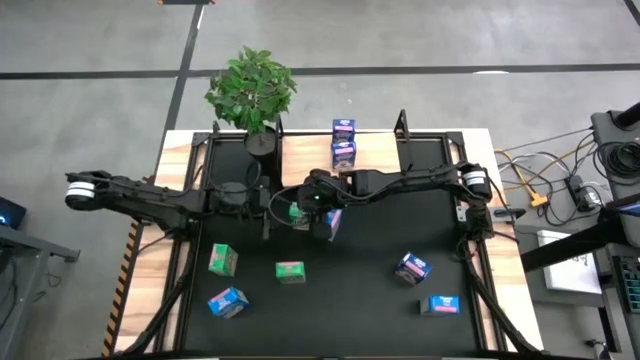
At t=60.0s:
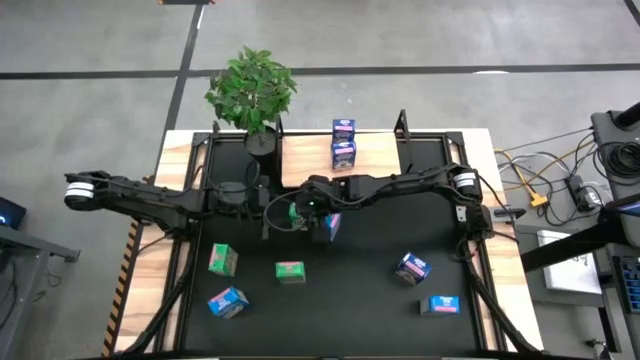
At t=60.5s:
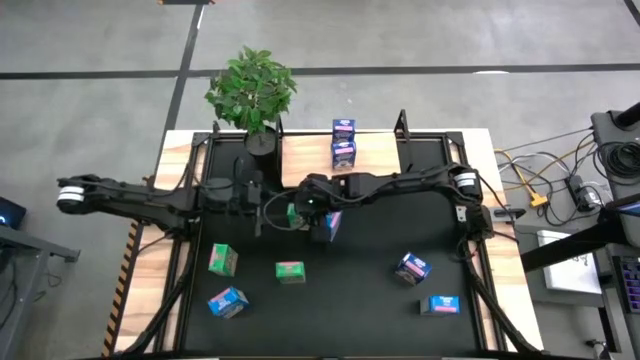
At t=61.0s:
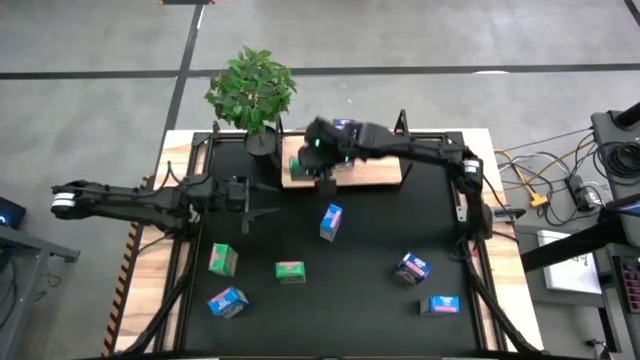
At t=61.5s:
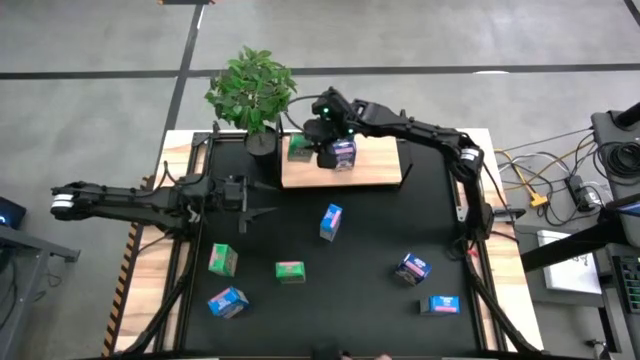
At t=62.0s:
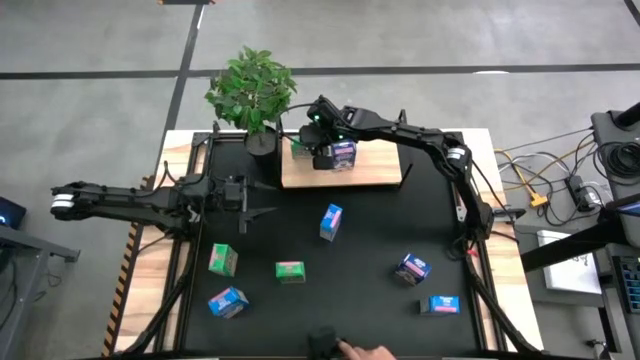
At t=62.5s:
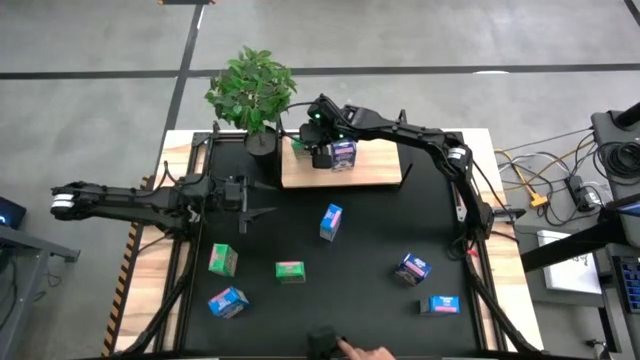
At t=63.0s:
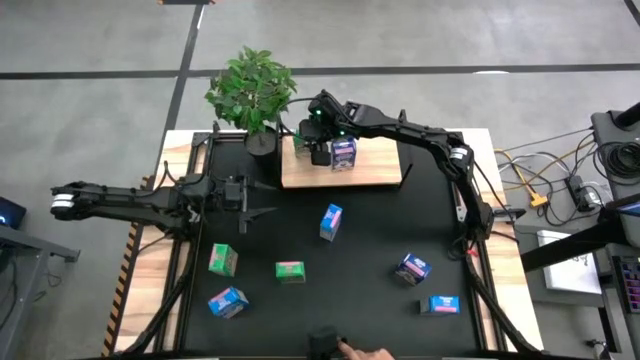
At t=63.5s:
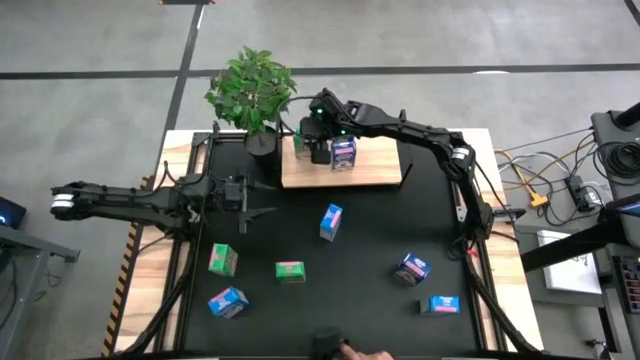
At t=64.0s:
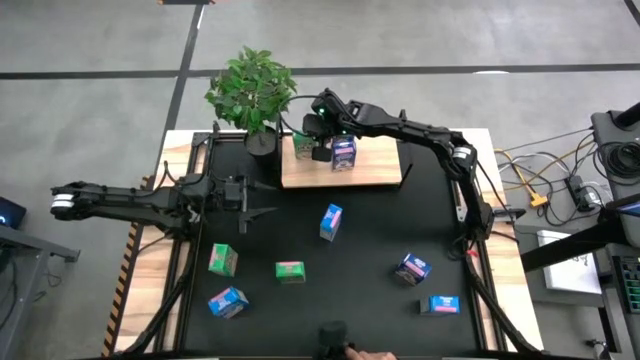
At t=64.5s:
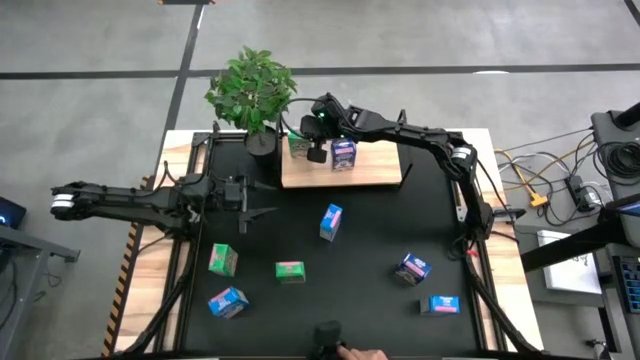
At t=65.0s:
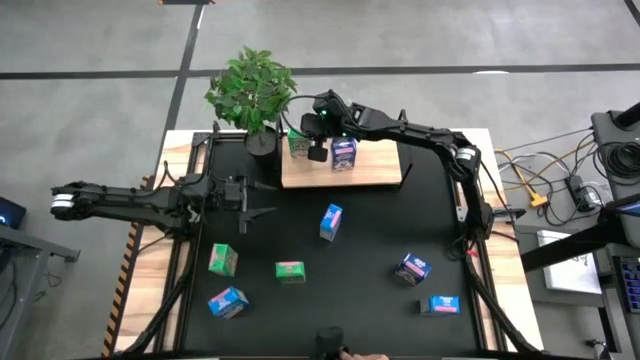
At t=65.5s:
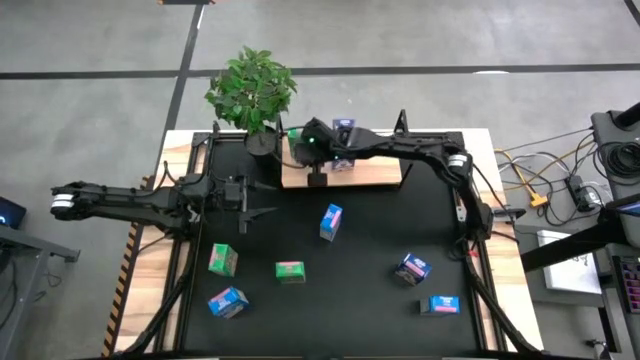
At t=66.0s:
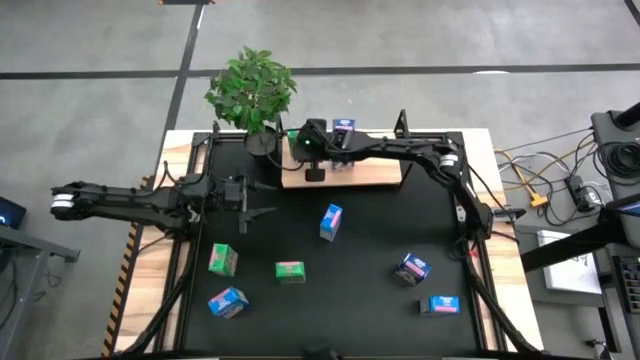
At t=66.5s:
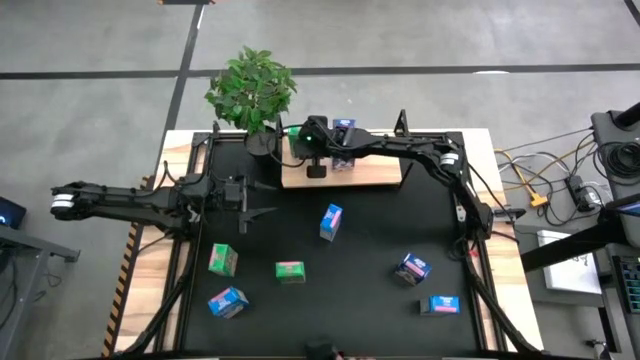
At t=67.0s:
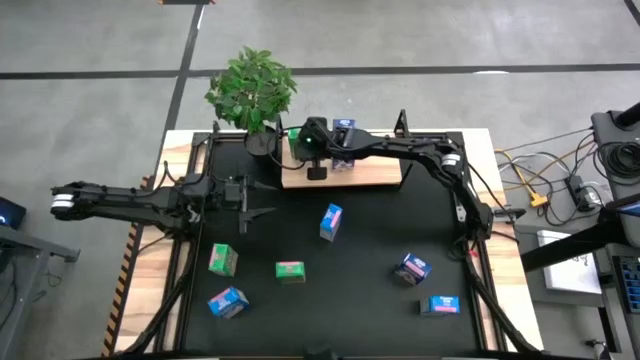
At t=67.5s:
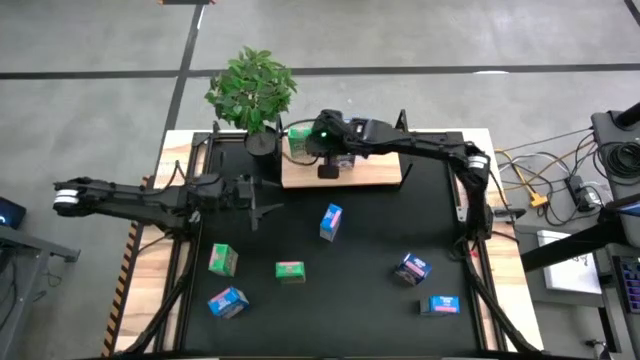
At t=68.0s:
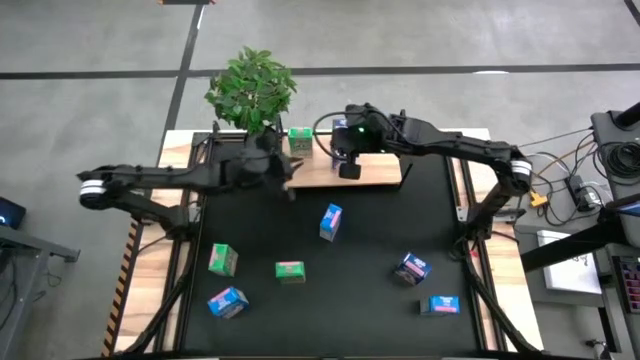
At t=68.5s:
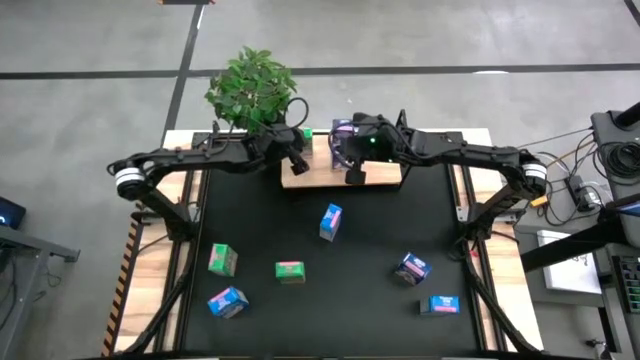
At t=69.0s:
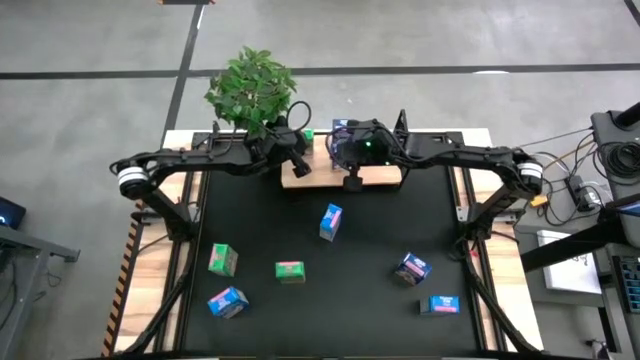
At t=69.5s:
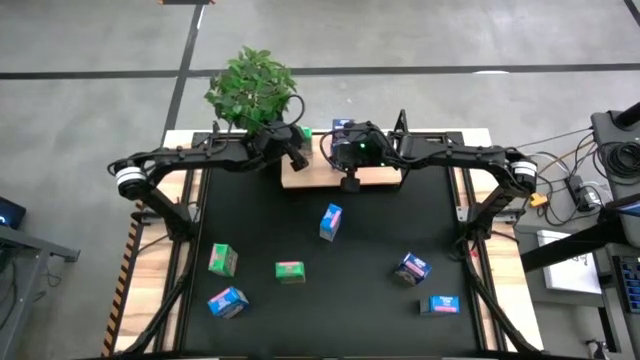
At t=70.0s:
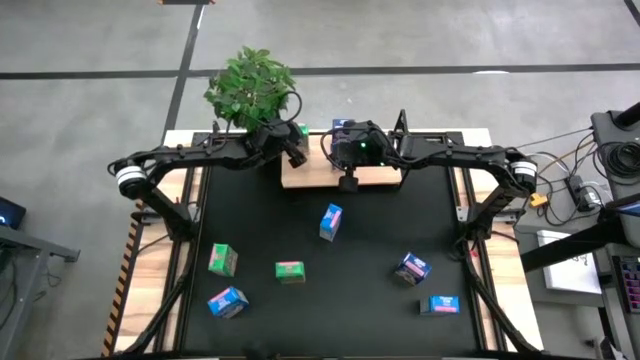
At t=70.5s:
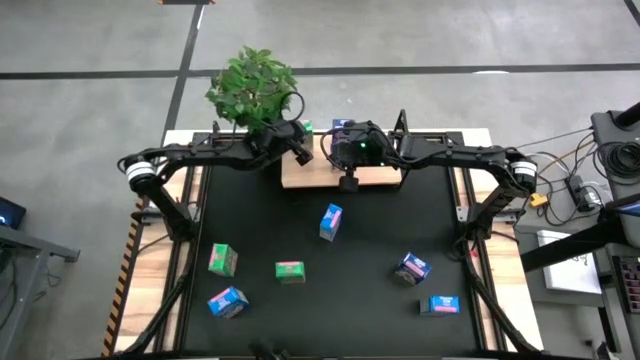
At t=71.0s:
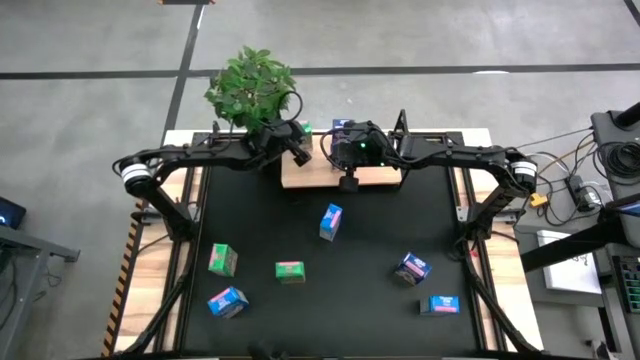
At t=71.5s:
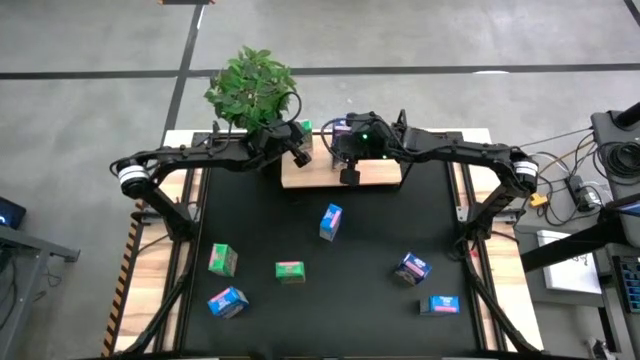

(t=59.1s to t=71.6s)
Task: Stack cereal on shelf
Put the top green cereal box on the shelf

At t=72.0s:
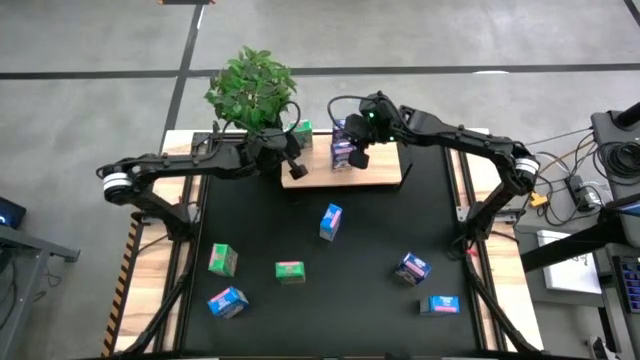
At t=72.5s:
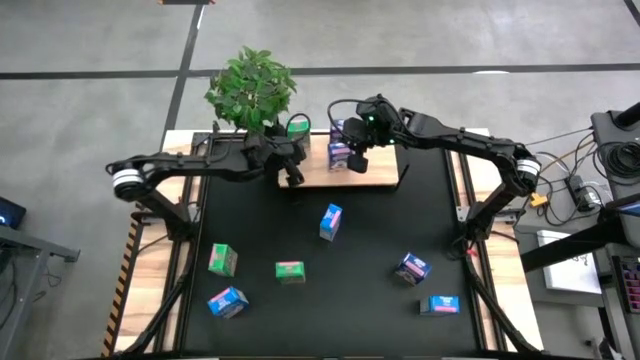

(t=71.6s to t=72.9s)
Adjust the shelf on the table

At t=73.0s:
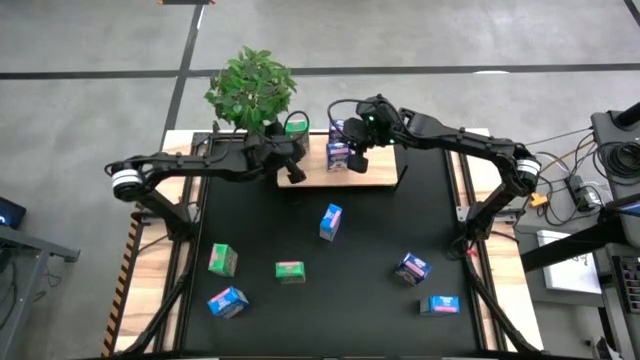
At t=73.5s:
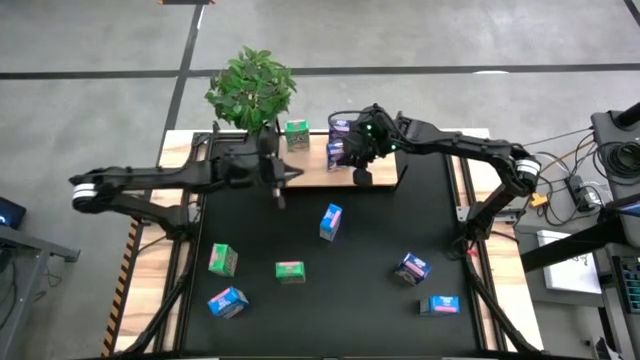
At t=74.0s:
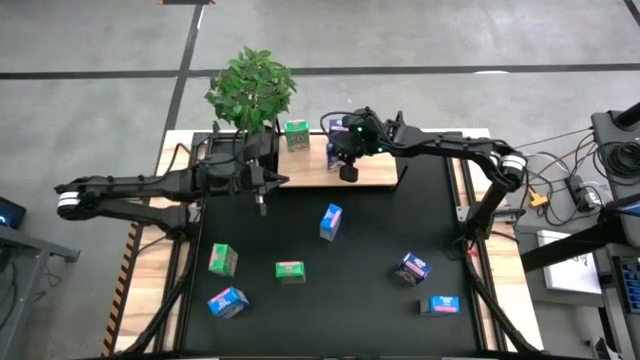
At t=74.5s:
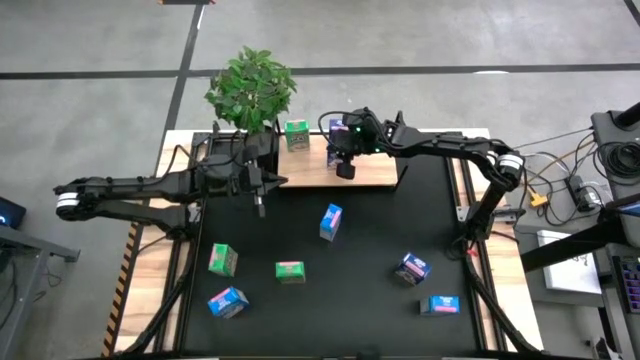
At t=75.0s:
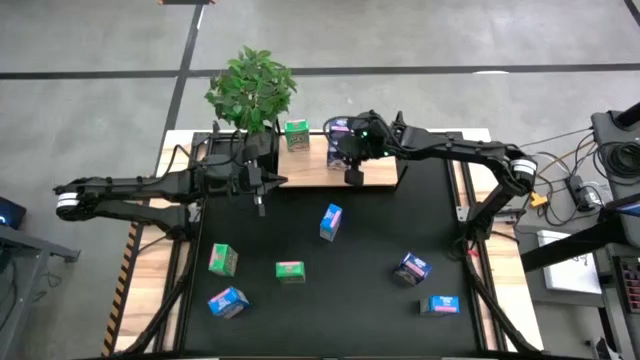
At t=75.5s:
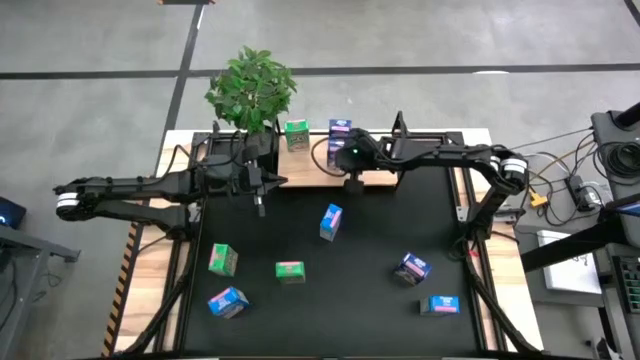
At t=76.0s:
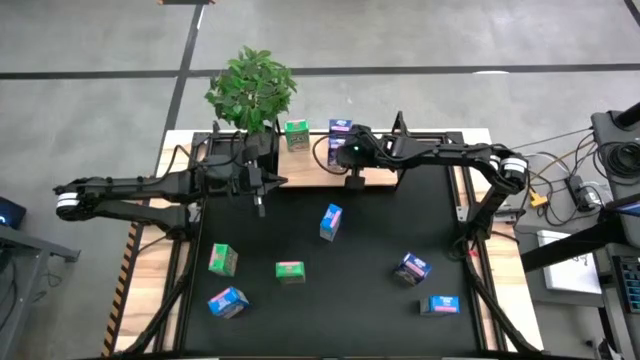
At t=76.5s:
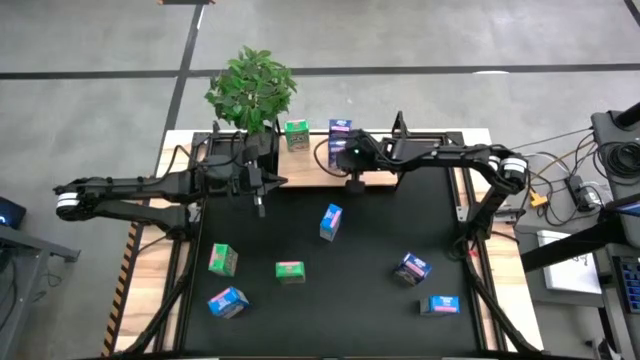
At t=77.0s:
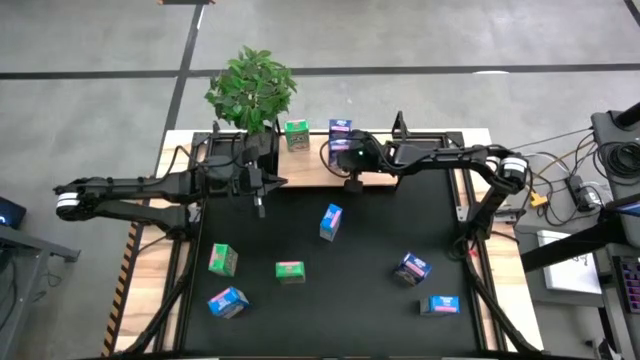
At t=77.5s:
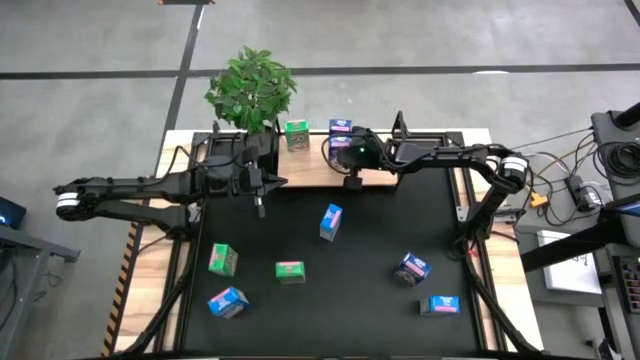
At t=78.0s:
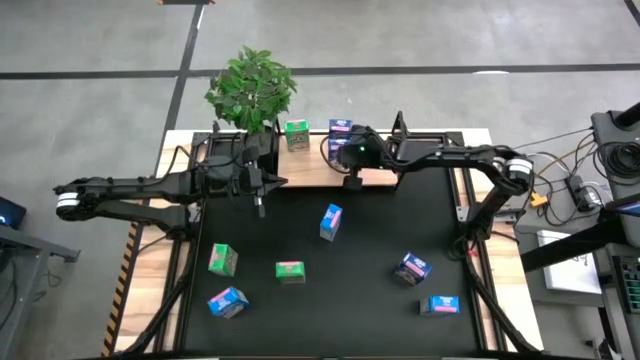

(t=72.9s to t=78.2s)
Adjust the blue cereal box on the shelf

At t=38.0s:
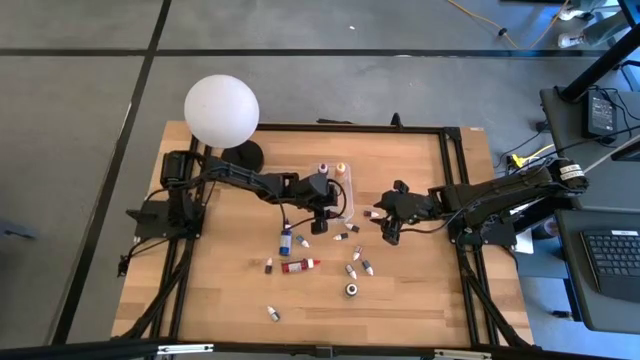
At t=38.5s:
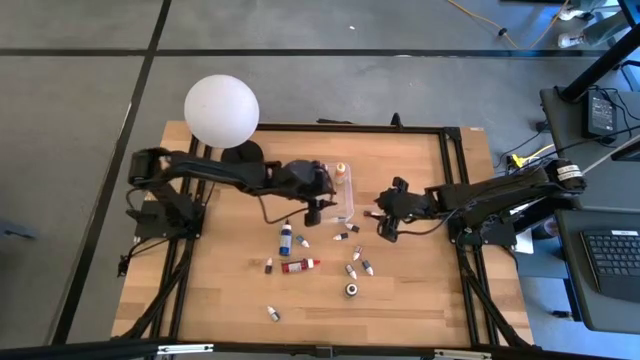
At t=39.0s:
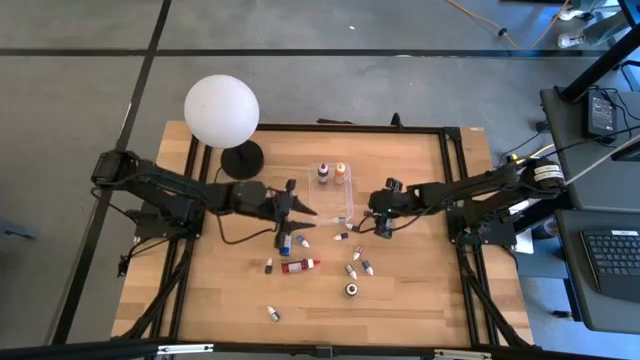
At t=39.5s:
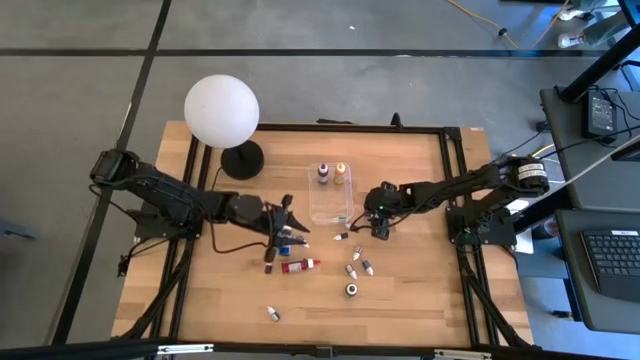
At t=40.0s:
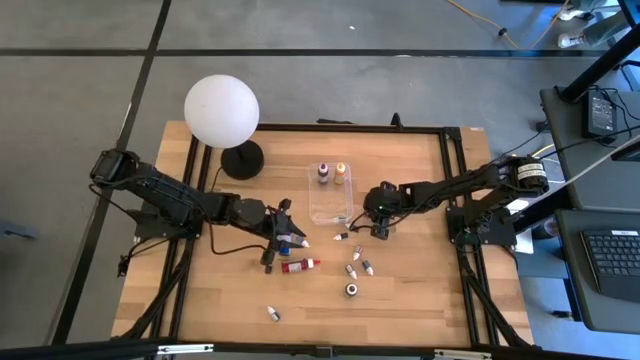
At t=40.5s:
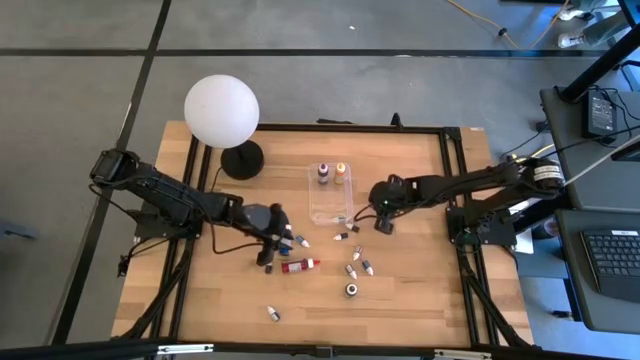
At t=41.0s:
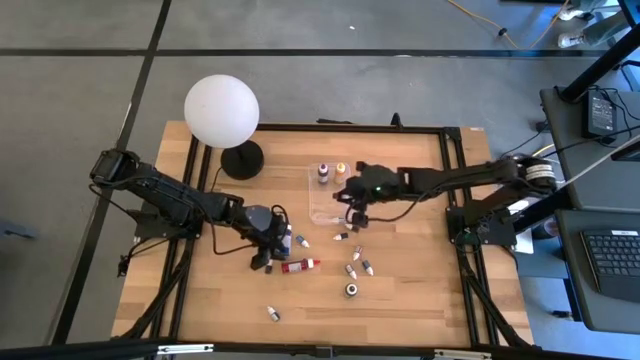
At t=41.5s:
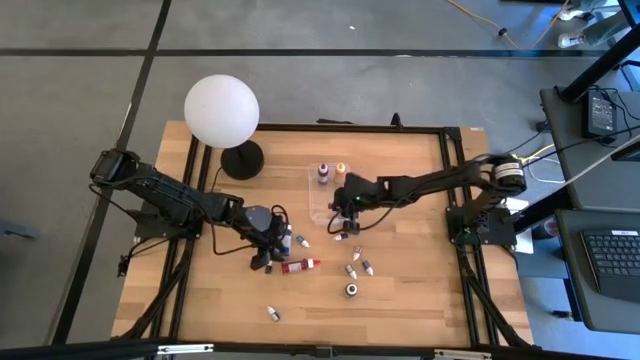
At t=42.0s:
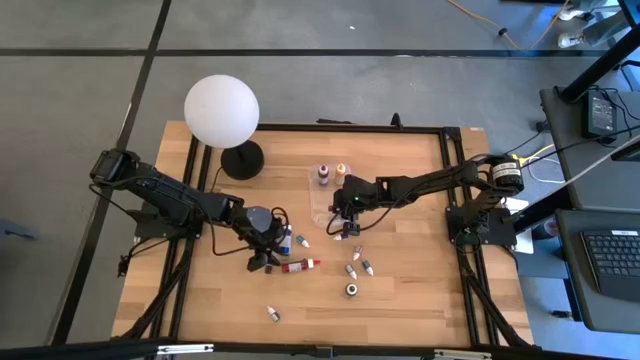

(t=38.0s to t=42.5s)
Task: Pick & Place food coloring
Put the small red food coloring bottle in the transparent bin
